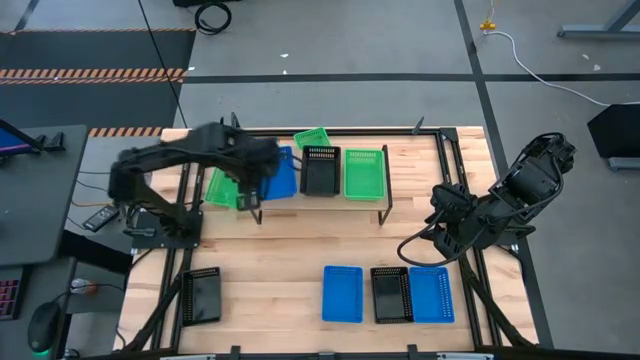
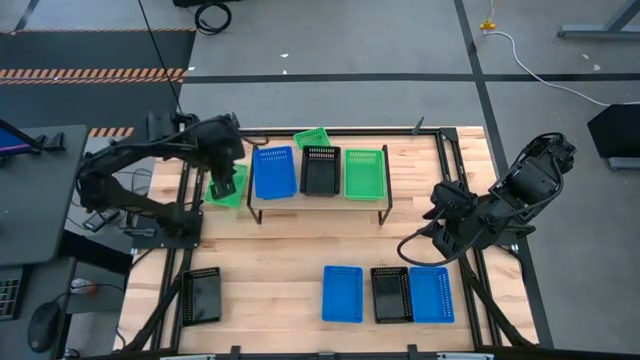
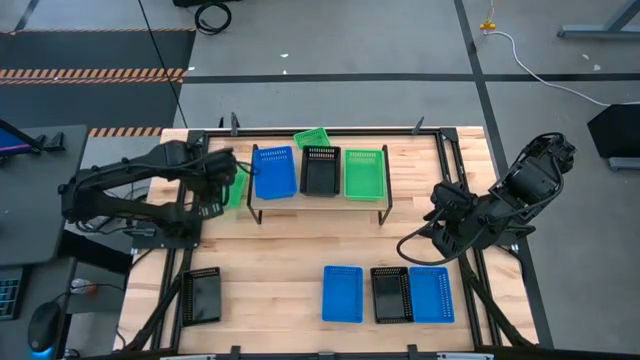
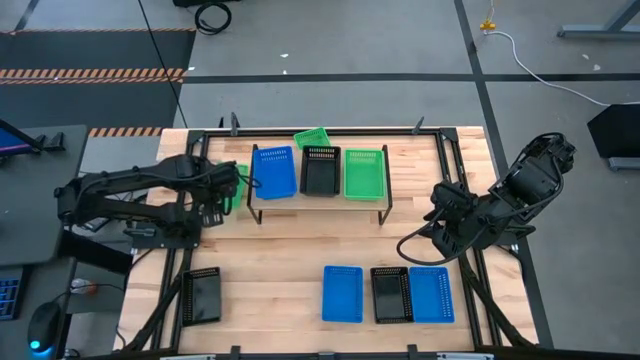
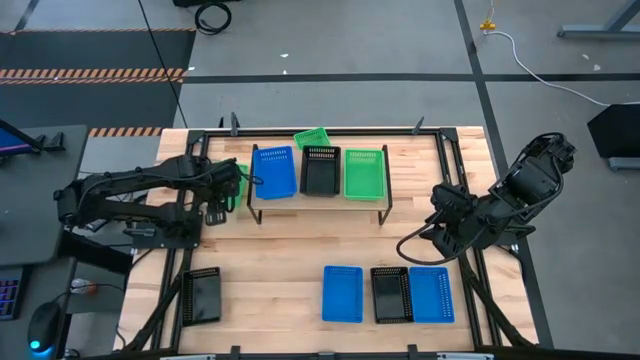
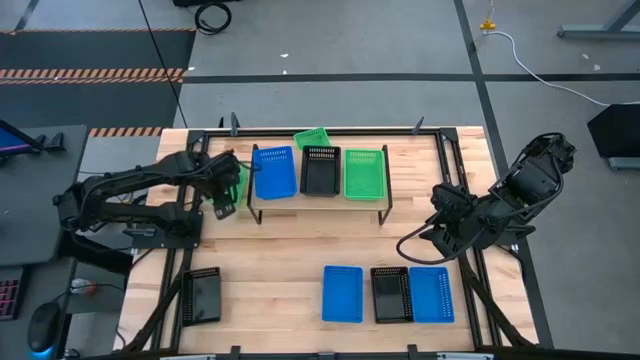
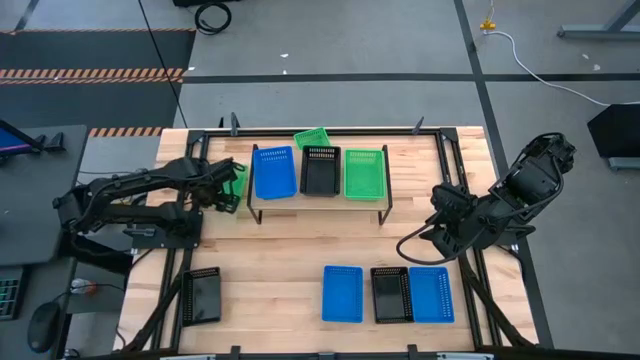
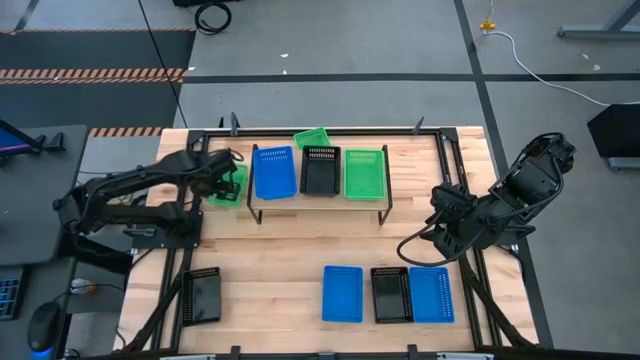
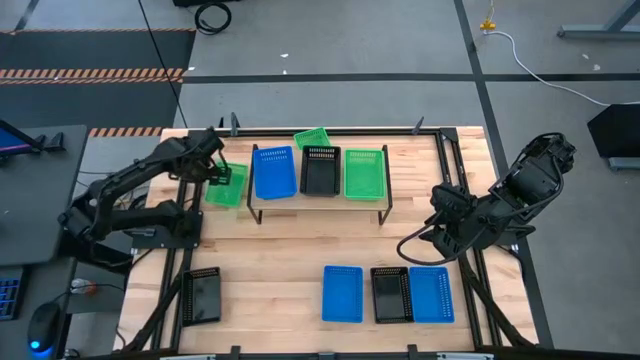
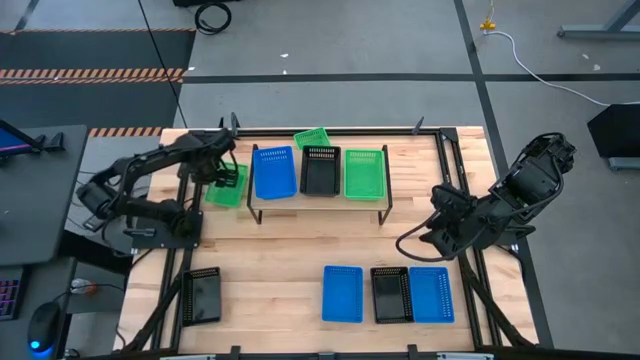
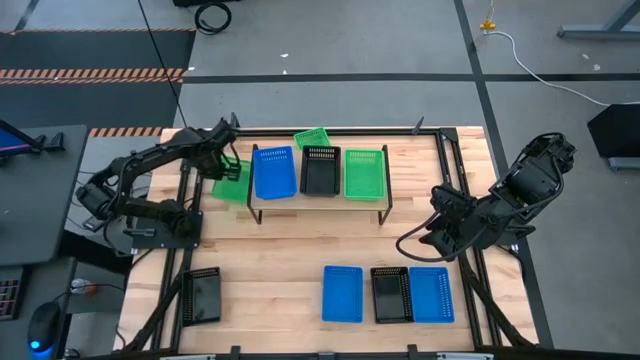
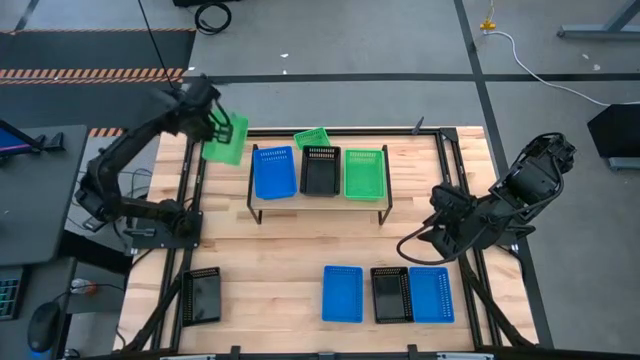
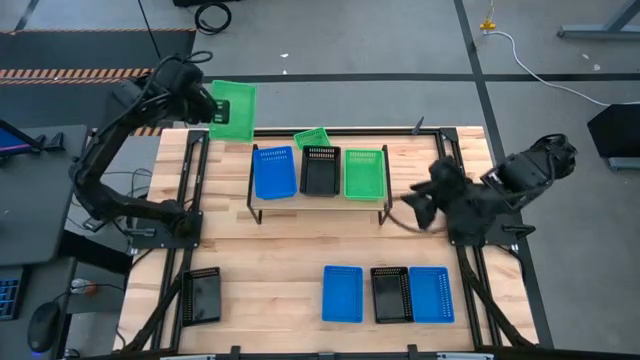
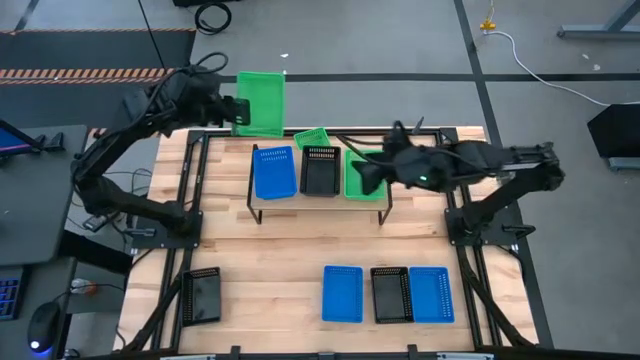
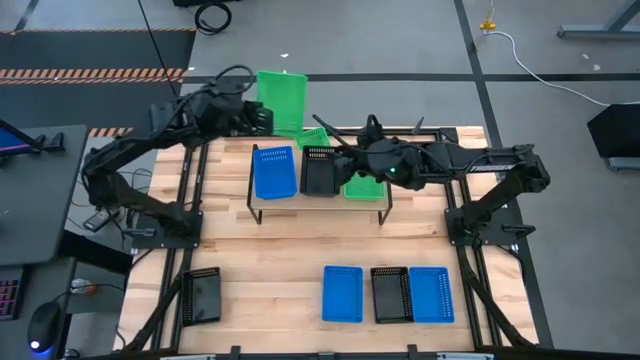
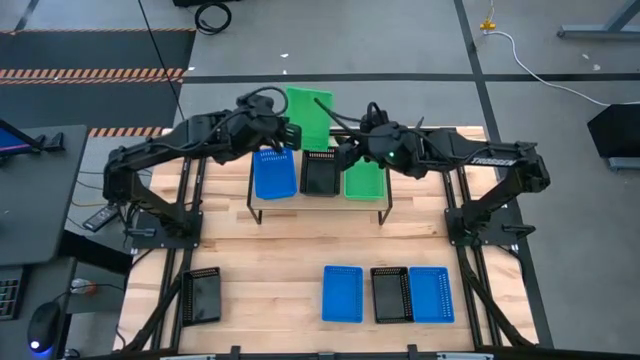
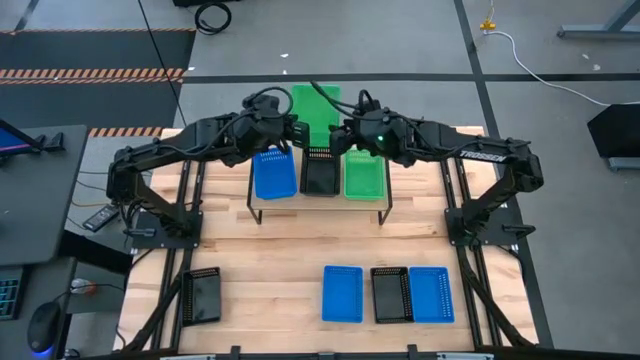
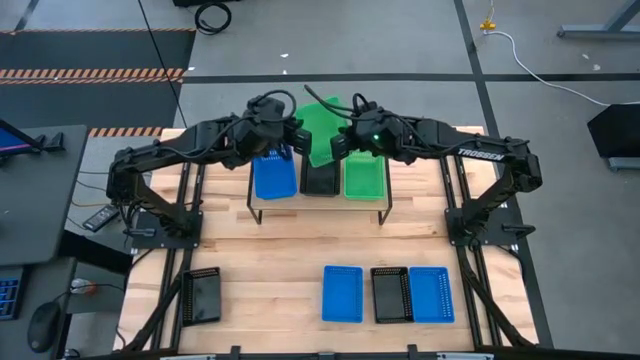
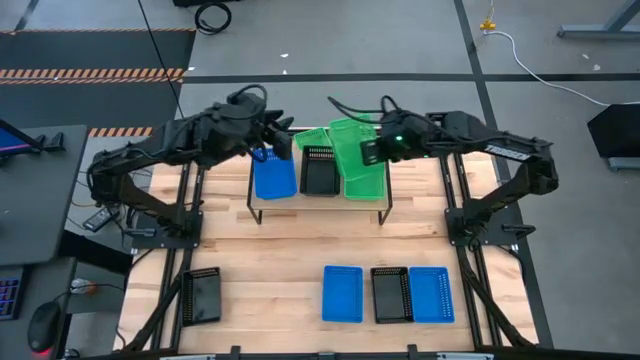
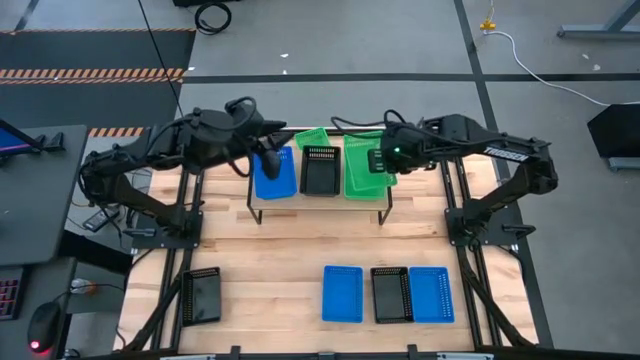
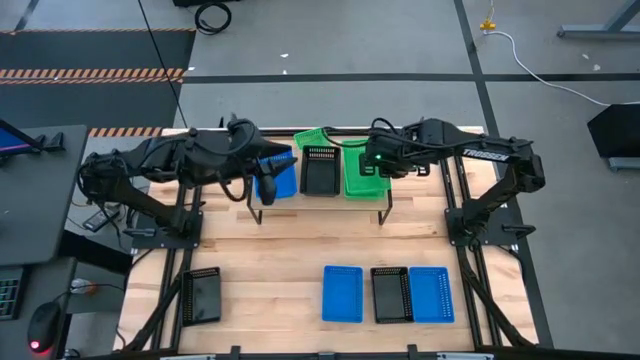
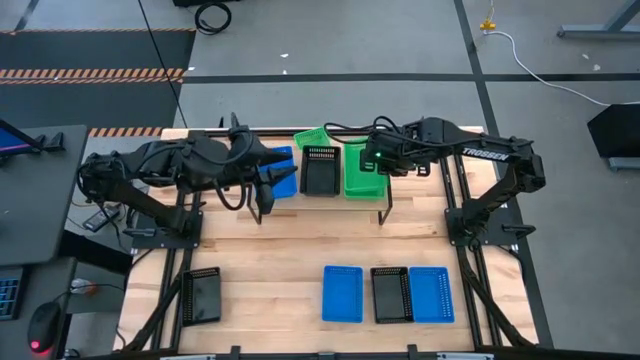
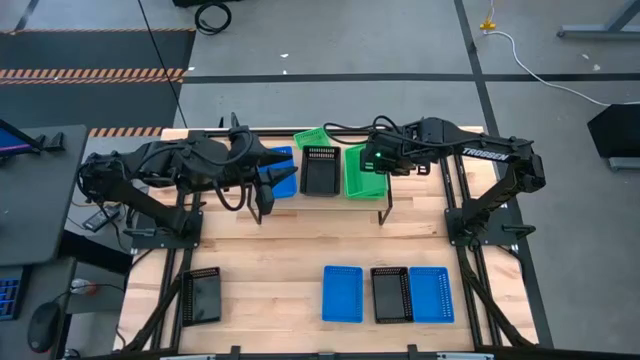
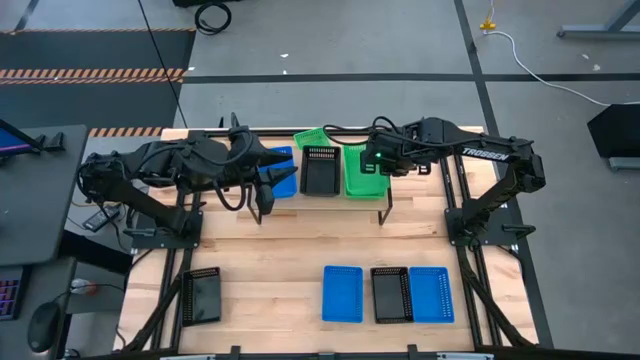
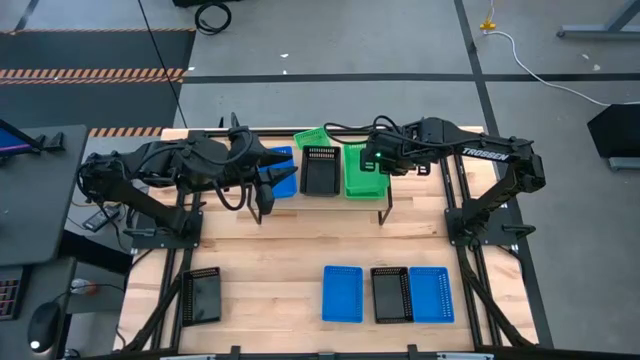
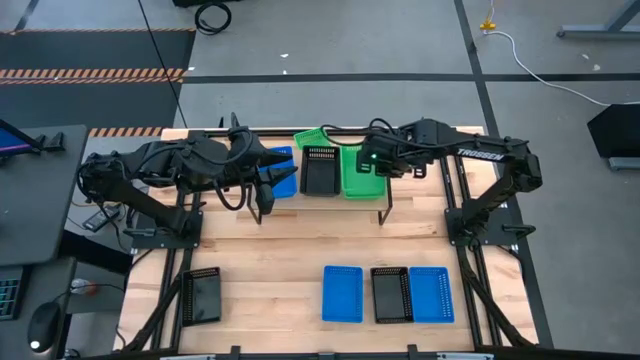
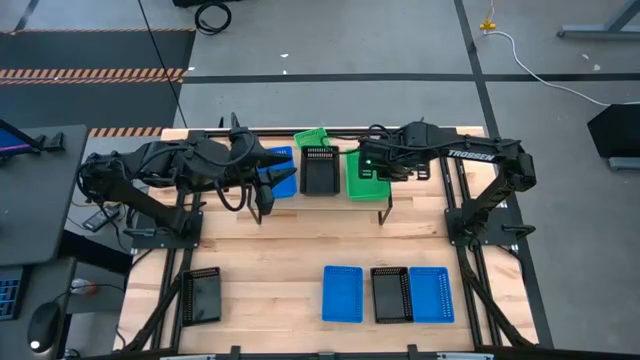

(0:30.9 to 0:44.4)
Task: Stack baskets on shelf by color
Stack the left green bin on top of the green bin on the shelf

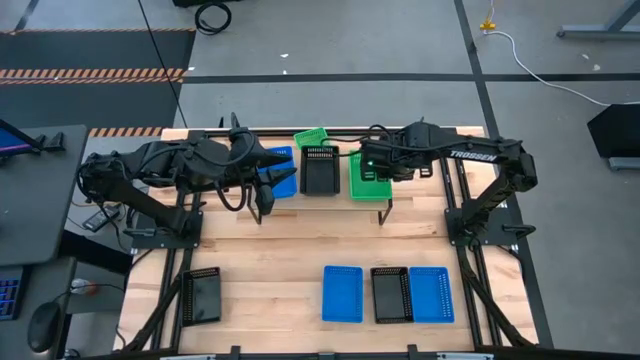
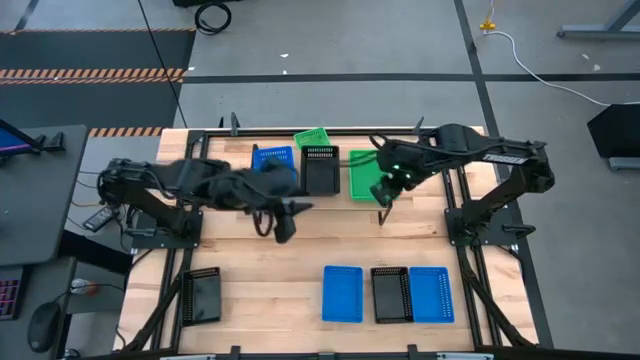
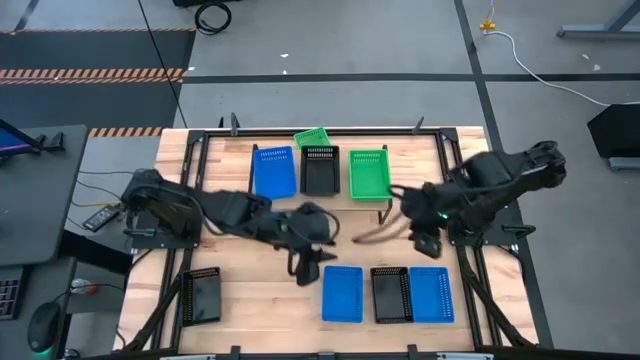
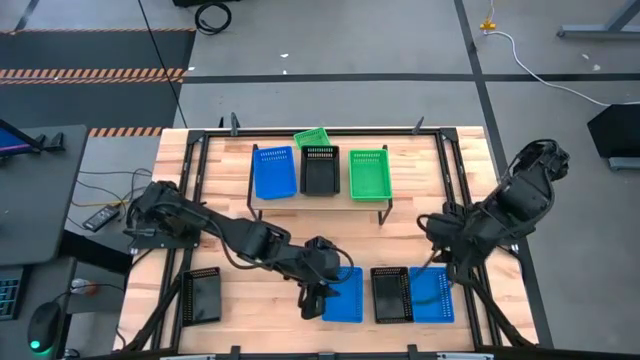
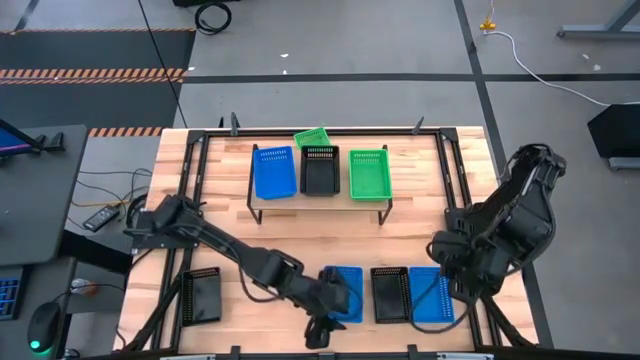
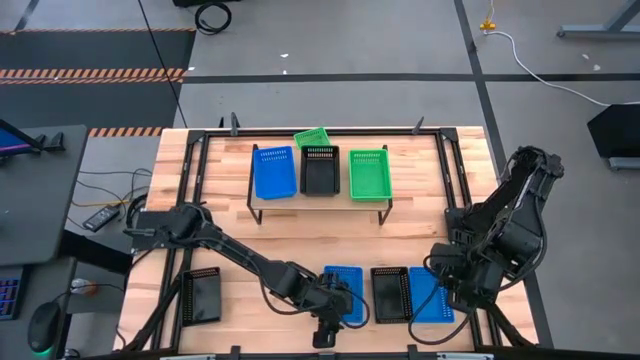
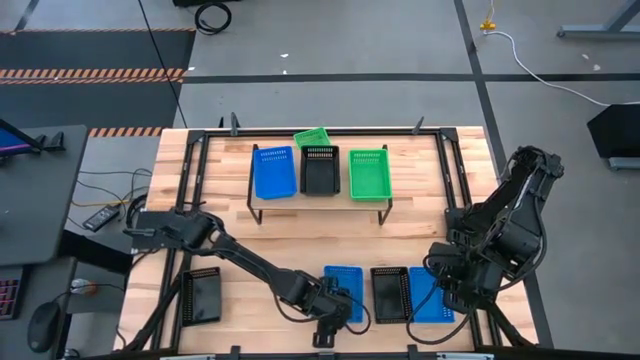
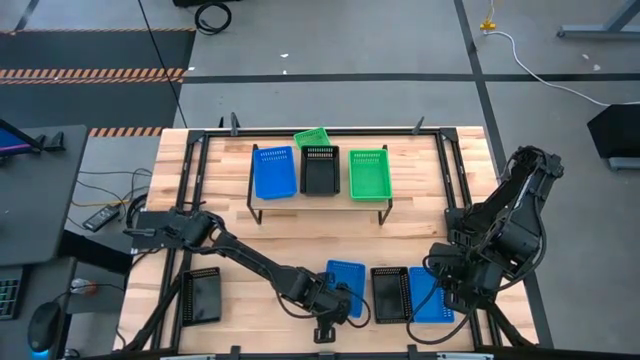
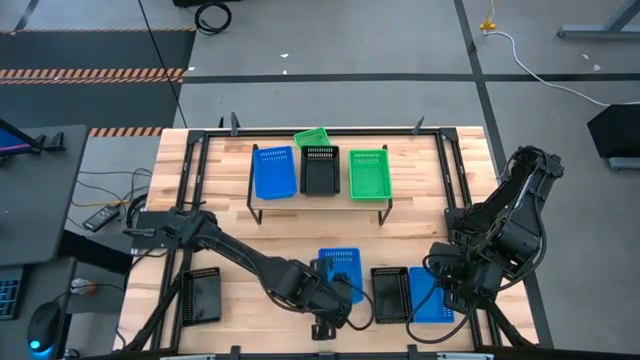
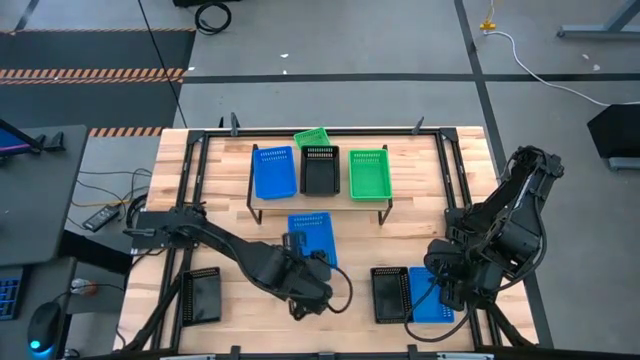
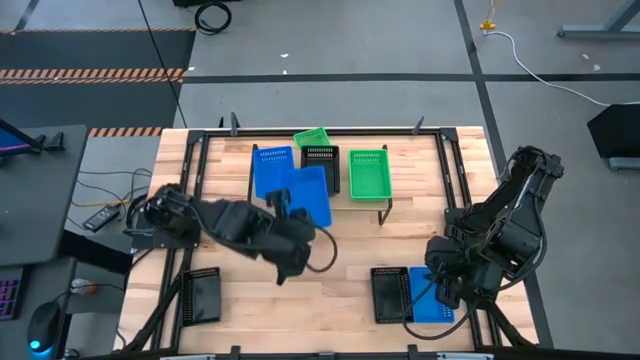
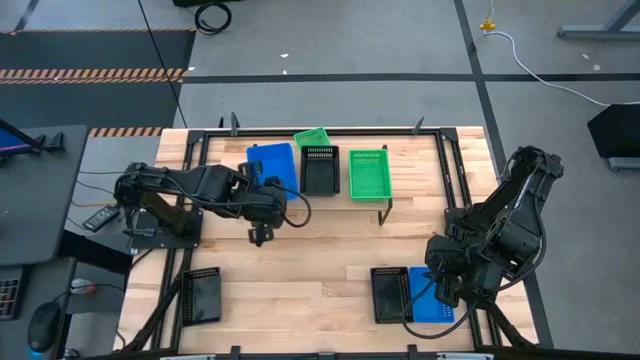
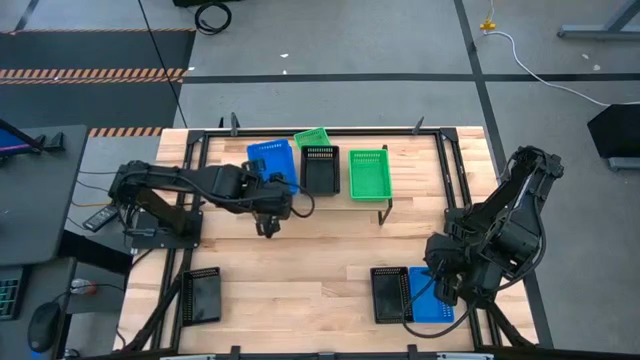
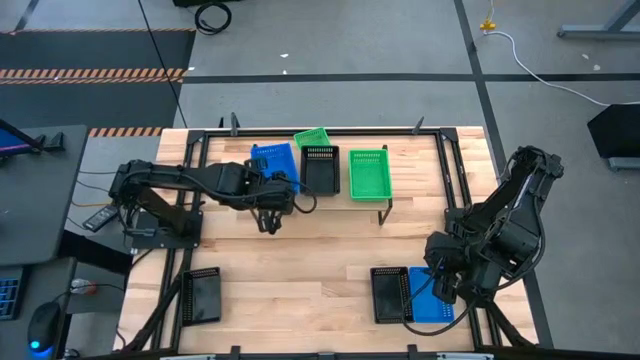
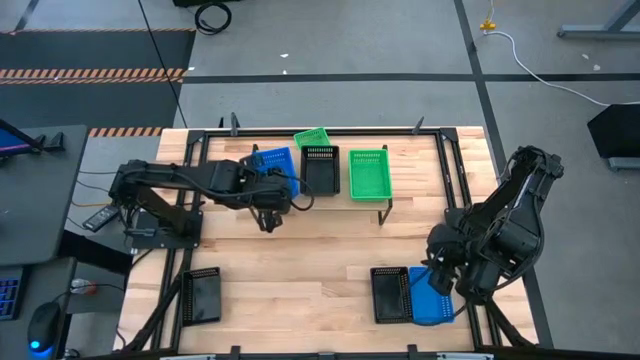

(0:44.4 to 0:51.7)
Stack the left blue bin on top of the blue bin on the shelf

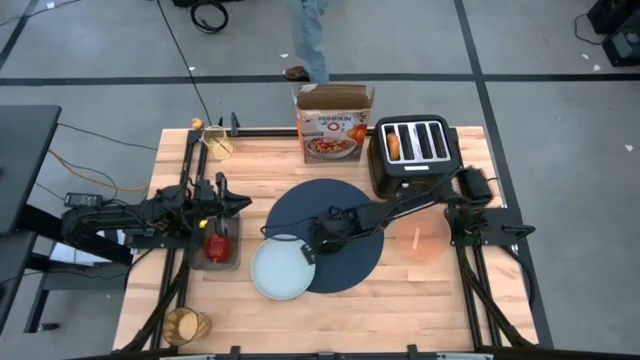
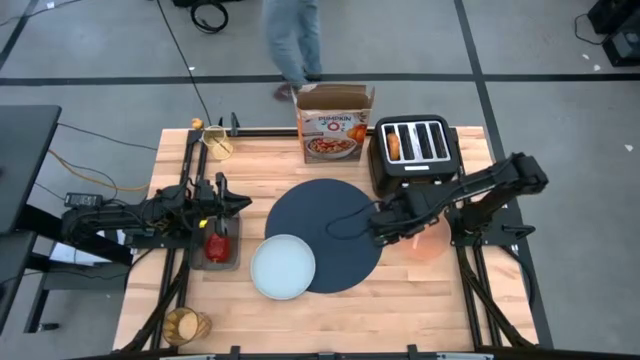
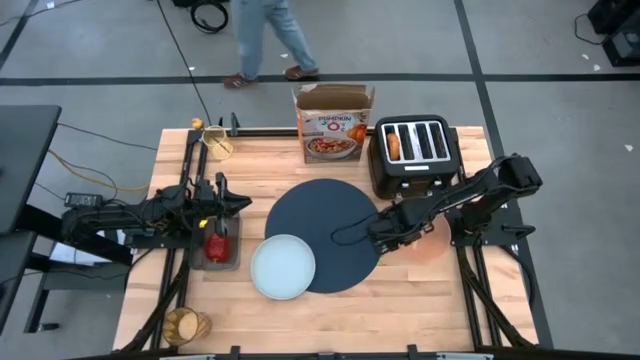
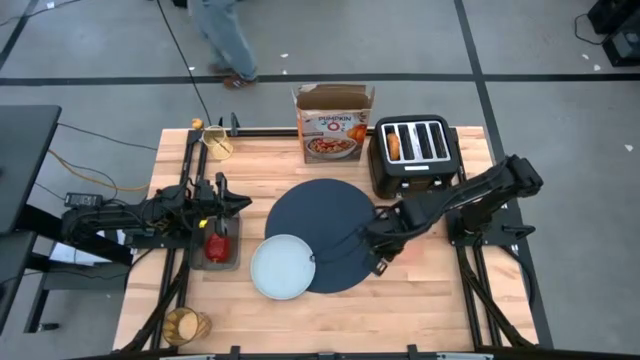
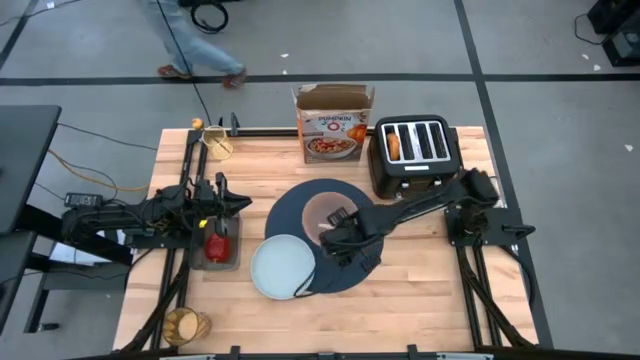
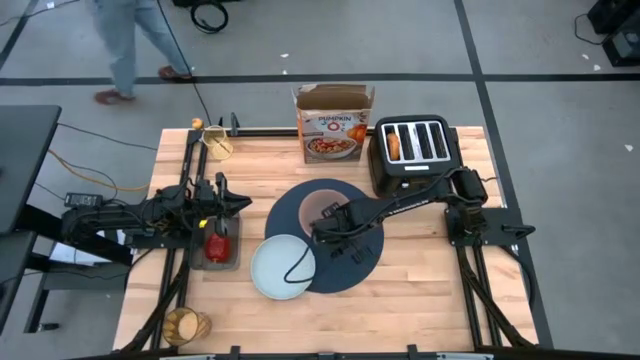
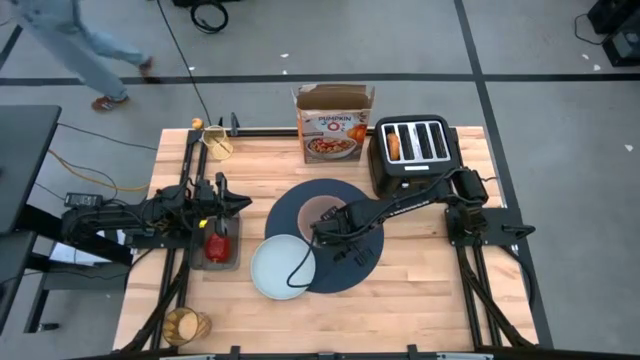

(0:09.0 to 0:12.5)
Task: Arrange a breakfast setting
Put the orange bowl to the top right of the blue plate
